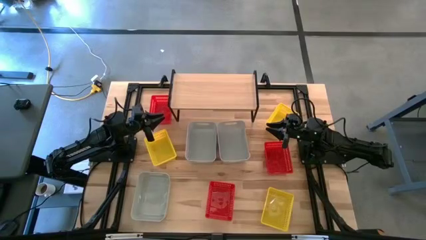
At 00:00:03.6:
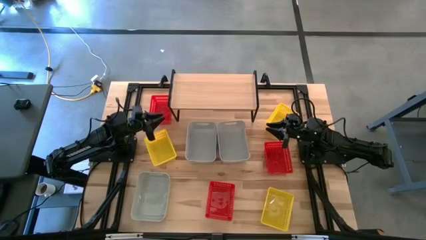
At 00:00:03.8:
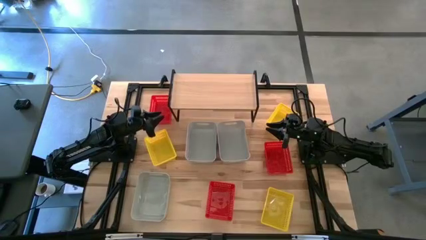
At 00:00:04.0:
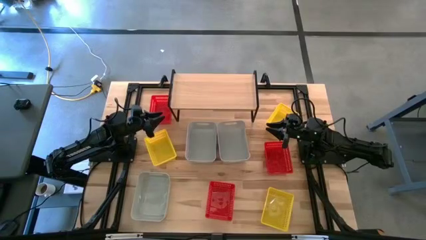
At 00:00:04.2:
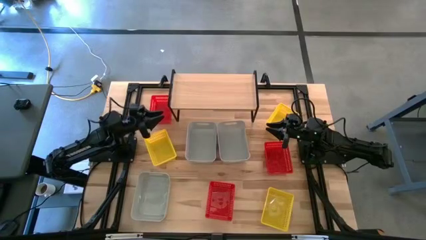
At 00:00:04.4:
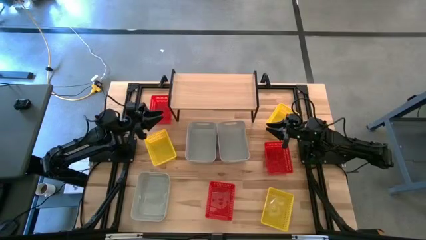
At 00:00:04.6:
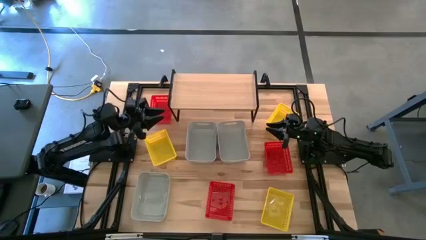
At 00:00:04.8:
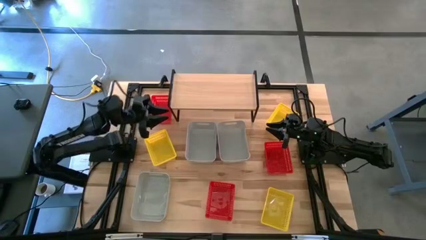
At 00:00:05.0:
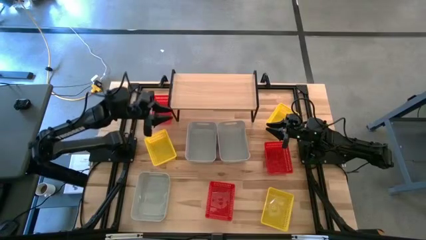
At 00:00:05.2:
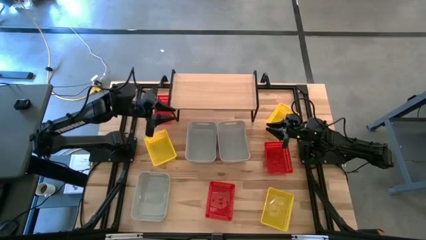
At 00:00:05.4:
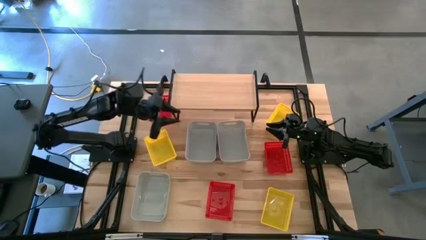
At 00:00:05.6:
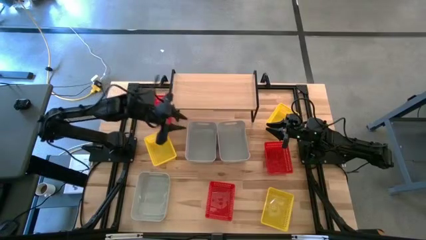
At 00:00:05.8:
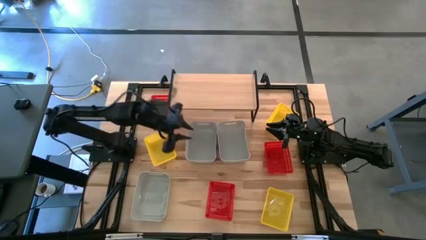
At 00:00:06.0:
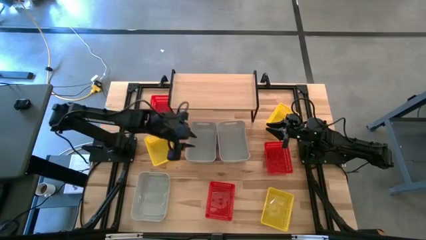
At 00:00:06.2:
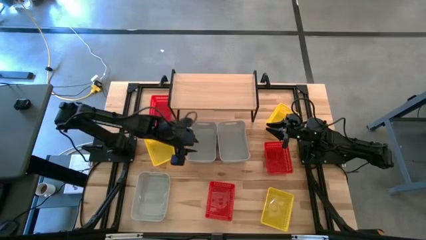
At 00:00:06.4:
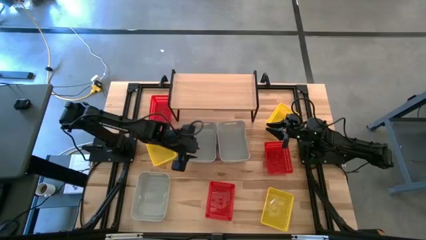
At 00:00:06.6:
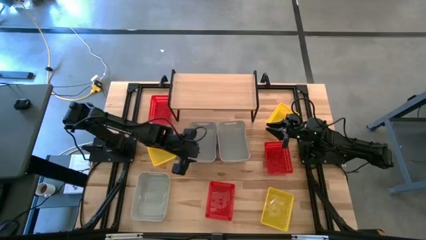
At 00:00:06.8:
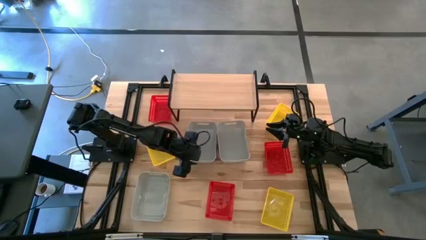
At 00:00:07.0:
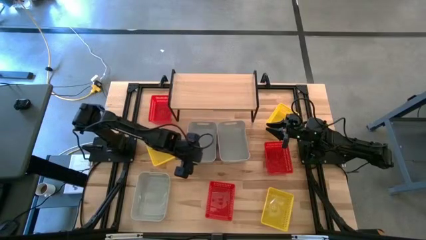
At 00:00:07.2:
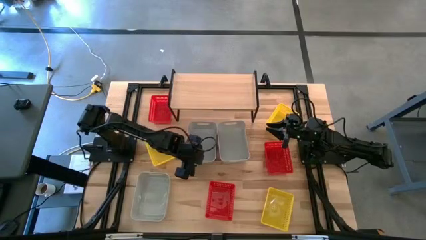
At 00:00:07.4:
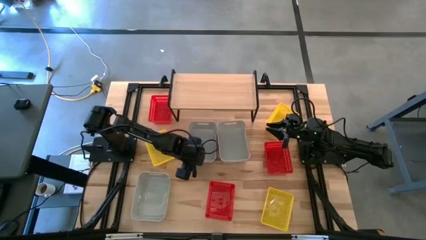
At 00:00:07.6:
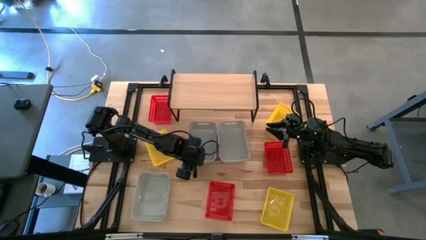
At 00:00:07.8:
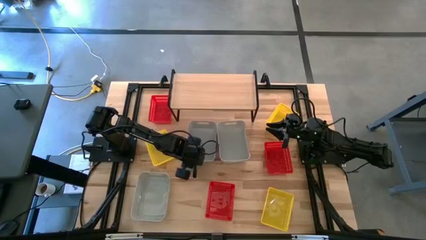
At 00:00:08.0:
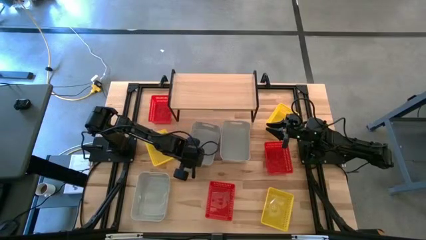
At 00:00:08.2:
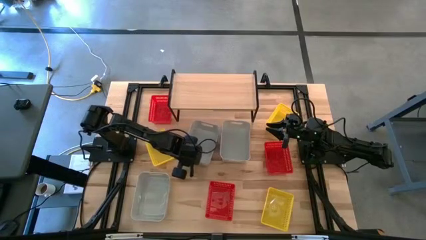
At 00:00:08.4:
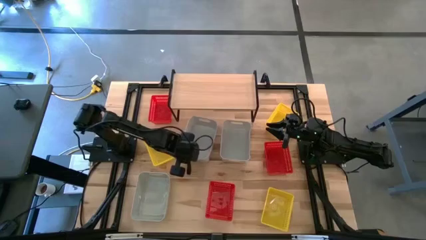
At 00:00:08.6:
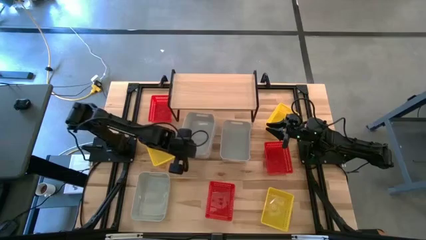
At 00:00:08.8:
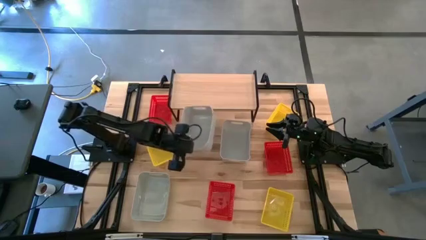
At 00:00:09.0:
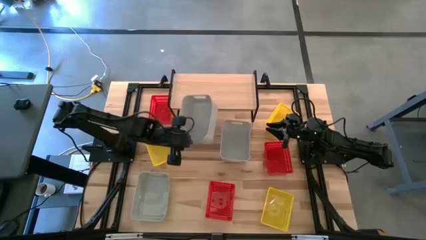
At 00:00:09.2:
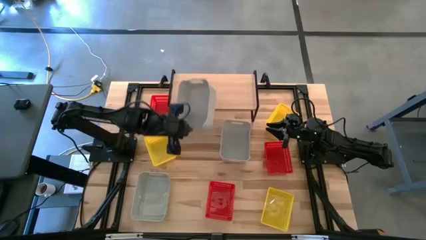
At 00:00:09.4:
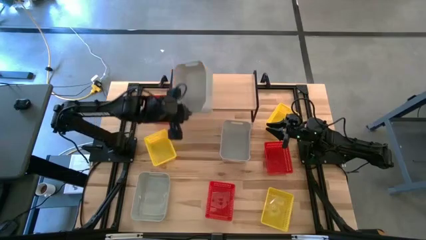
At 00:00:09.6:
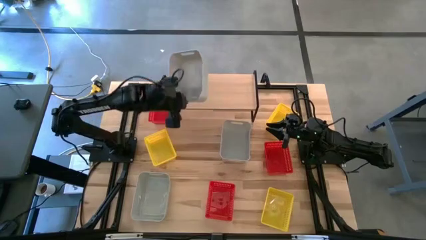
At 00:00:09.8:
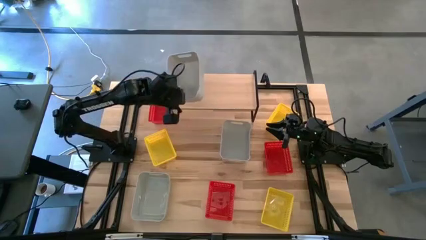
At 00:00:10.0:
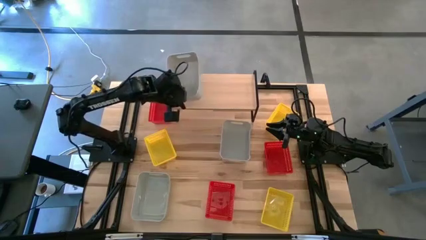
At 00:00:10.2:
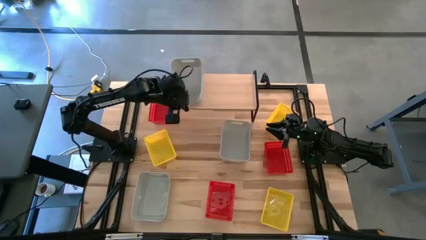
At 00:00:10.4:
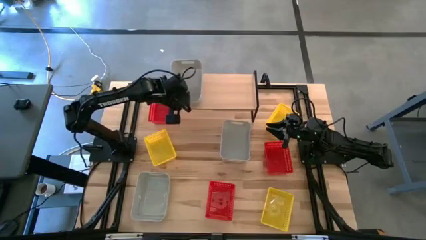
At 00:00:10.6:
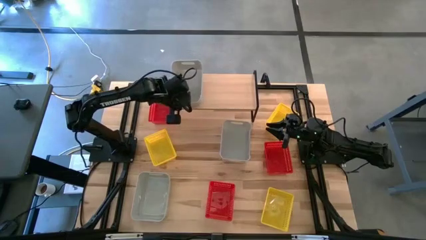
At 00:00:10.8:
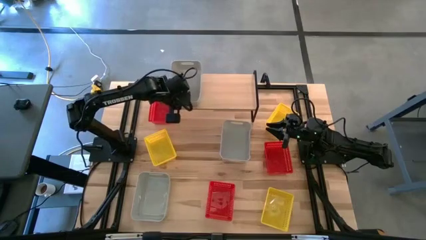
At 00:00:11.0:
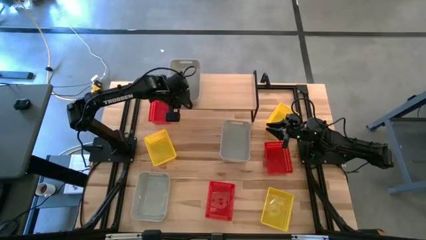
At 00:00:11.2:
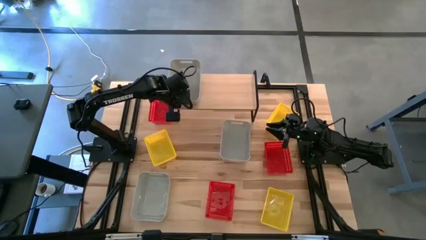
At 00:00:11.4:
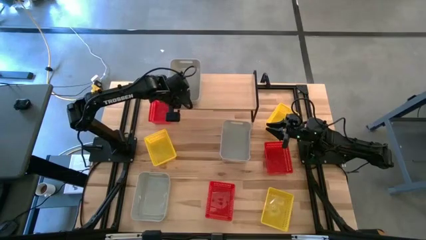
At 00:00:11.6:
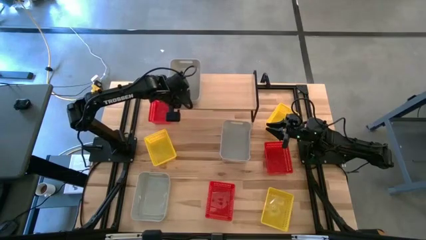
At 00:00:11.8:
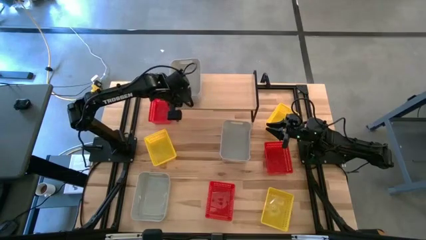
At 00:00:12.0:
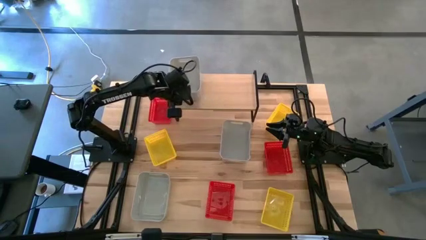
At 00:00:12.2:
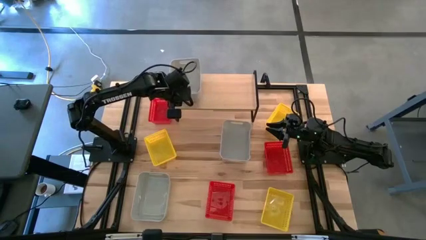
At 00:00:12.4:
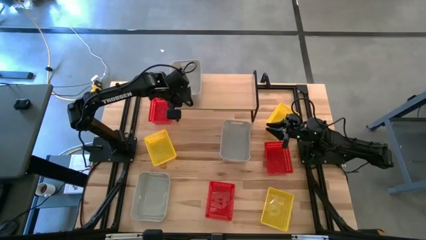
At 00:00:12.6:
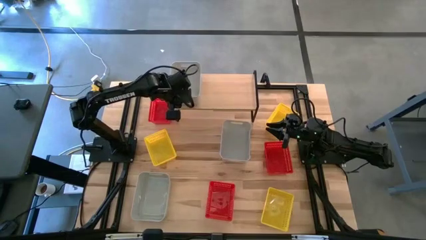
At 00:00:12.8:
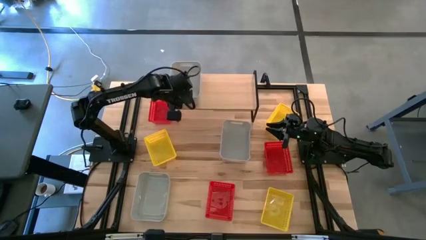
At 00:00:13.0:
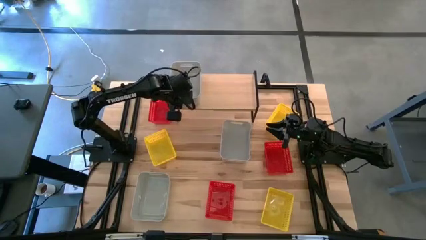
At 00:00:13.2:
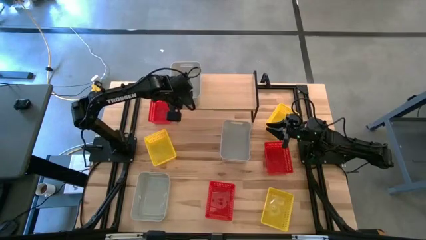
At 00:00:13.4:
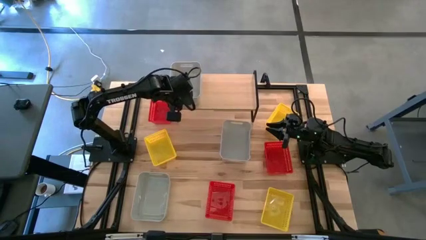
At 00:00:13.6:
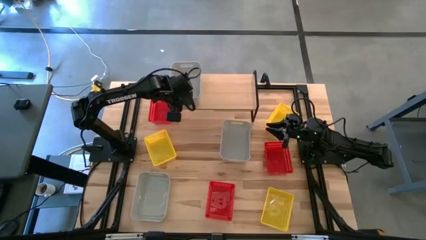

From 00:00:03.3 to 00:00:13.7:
Task: Stack baskets on shelf by color
Put the top left gray bin on the shelf

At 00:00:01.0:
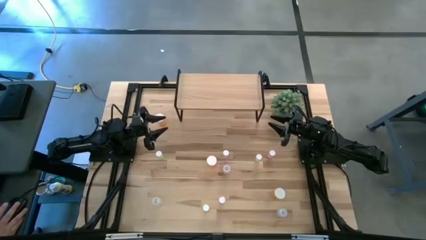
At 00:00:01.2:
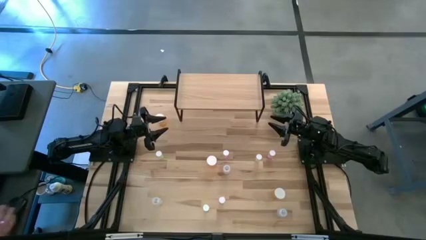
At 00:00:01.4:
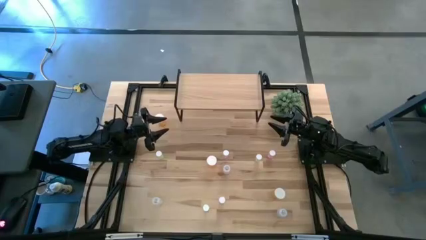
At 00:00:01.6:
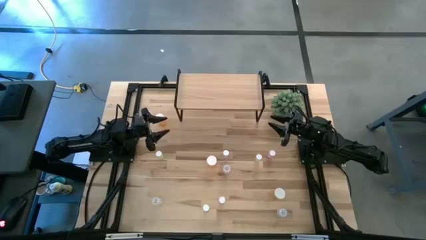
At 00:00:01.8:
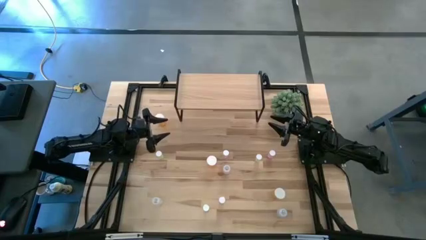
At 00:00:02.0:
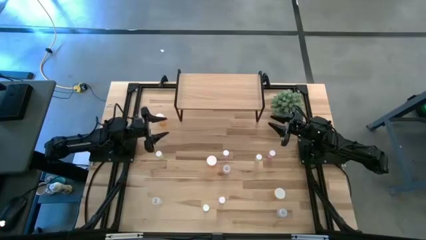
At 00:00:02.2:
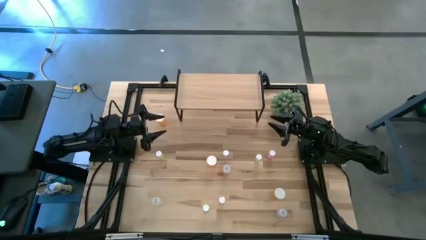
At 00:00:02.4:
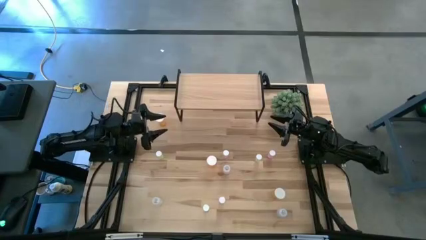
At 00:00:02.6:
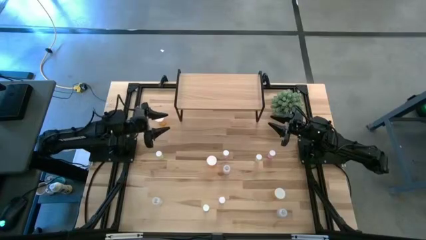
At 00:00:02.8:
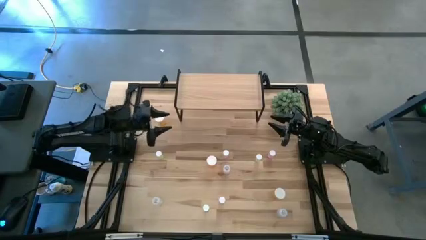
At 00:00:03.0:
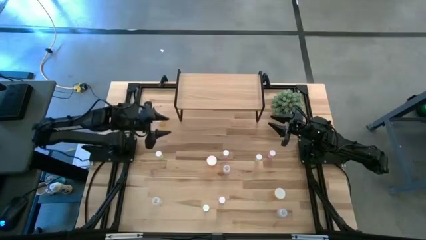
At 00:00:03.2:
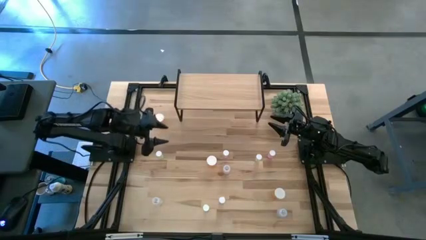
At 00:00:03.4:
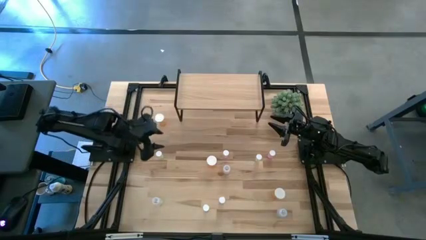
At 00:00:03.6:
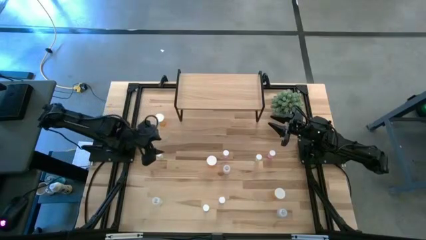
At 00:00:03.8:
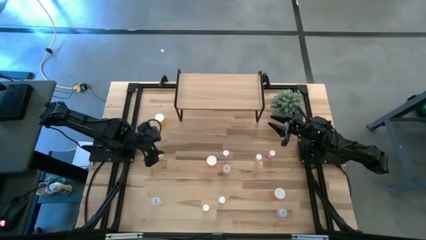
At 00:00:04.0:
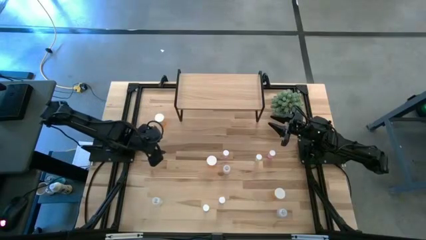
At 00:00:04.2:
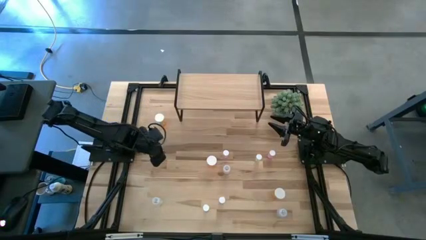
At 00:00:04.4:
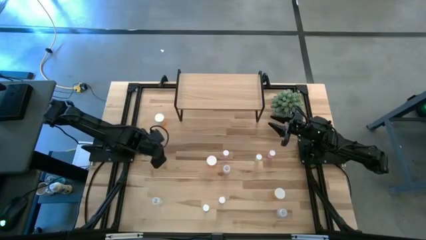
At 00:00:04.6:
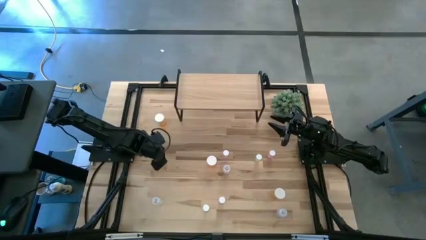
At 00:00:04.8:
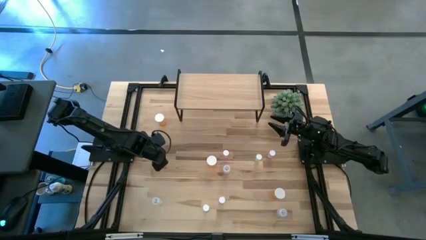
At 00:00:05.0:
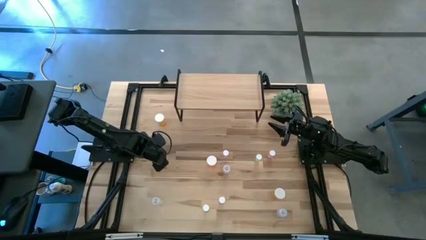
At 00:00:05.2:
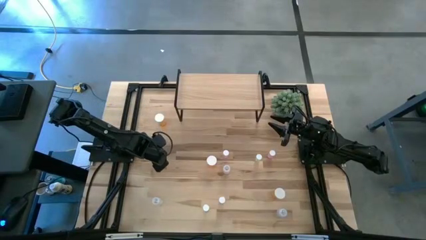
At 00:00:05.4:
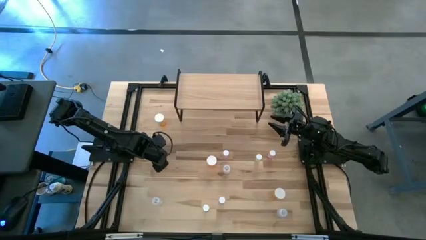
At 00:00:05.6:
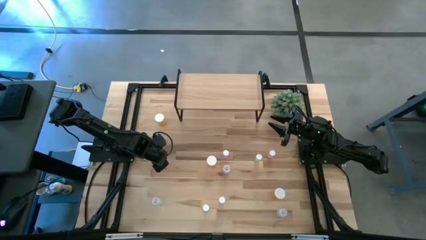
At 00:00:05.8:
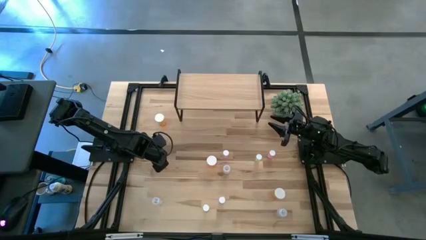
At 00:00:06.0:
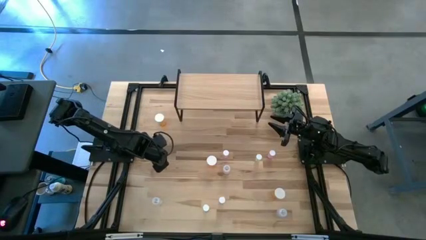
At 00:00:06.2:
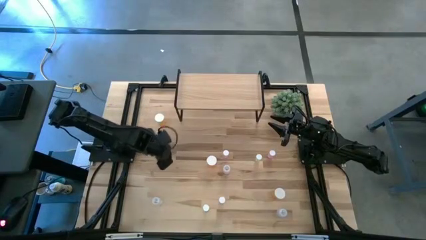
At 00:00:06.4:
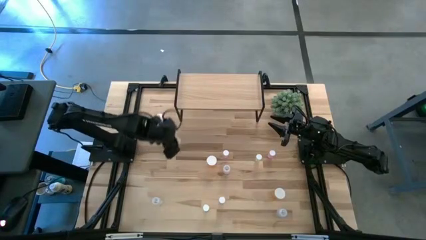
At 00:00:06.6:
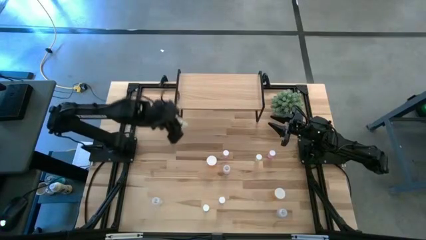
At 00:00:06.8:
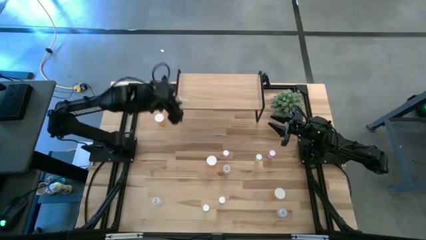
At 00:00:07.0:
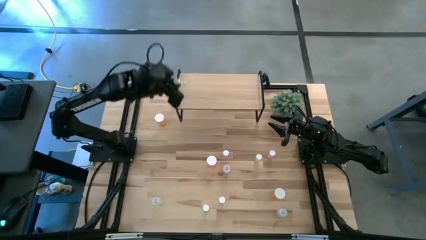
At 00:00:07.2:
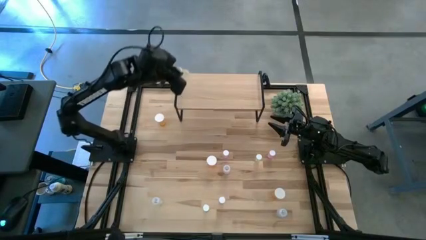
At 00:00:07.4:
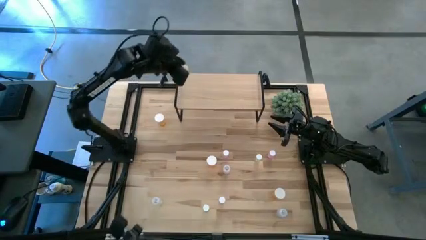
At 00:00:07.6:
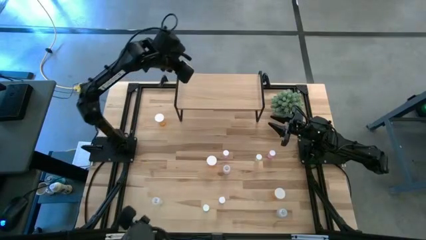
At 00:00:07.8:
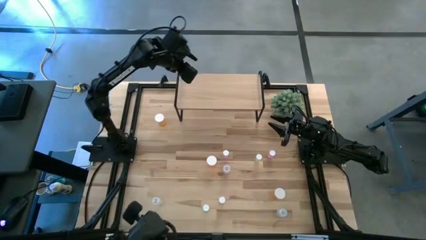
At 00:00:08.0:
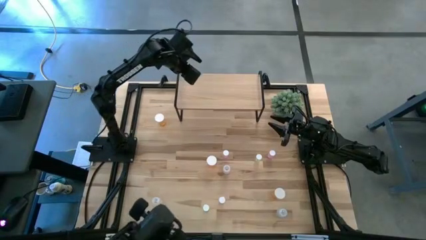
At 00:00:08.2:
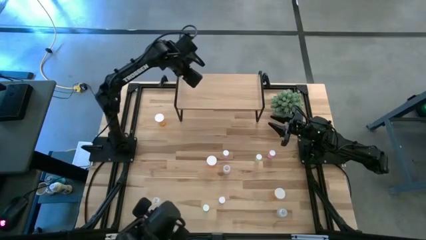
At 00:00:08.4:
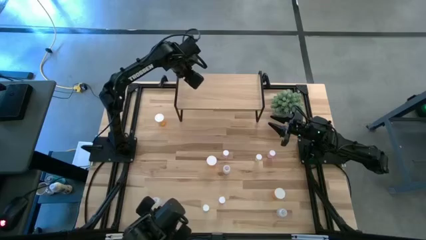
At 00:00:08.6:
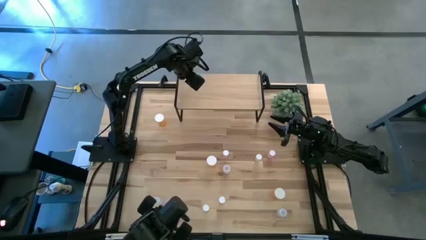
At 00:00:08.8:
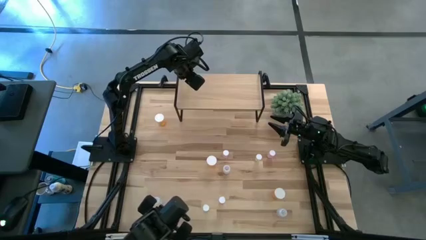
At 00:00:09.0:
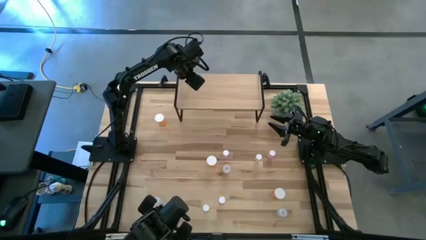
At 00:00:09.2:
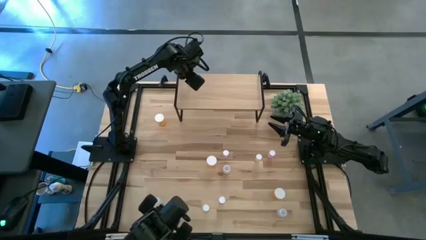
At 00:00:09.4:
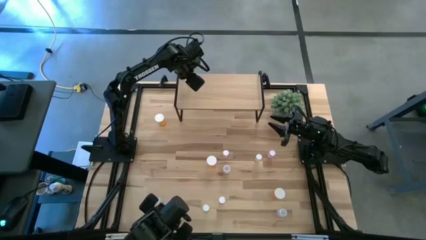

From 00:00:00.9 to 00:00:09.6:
Task: Pick and place medicine bottles onto shelf by color
Put the top left green pill bottle on the shelf
